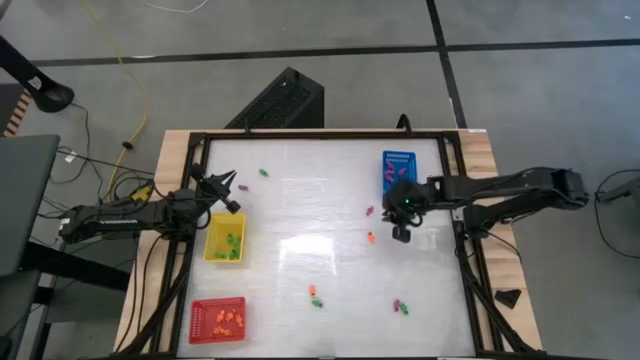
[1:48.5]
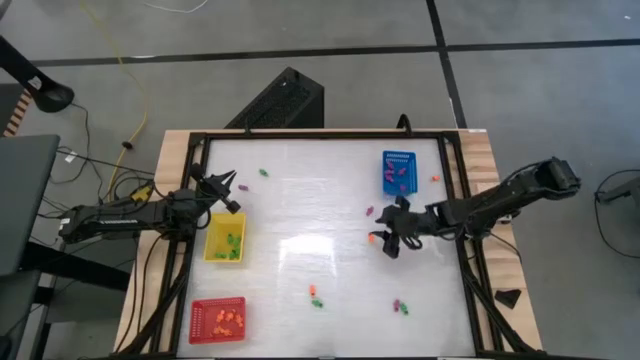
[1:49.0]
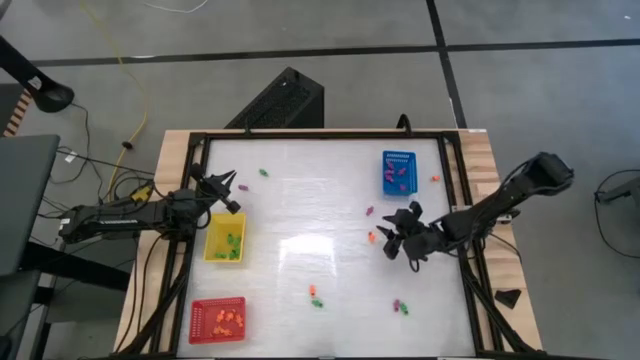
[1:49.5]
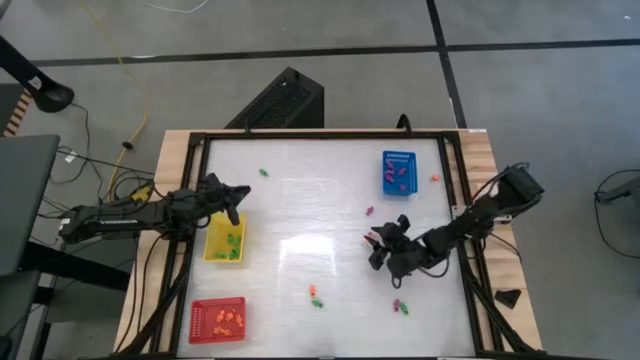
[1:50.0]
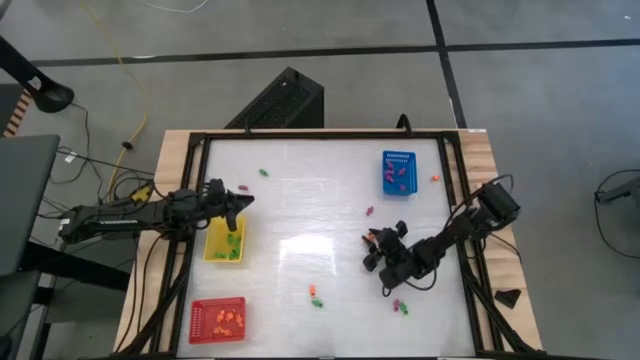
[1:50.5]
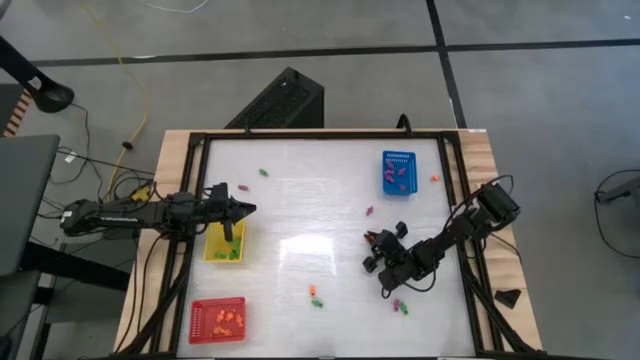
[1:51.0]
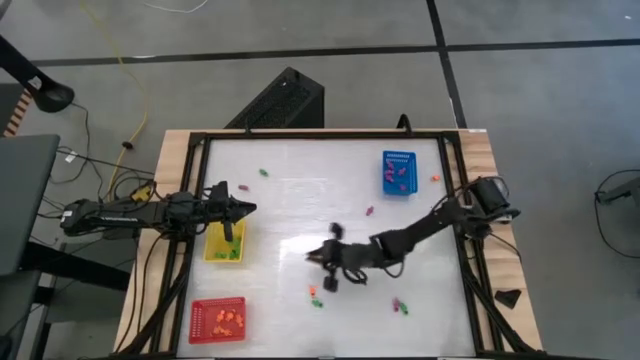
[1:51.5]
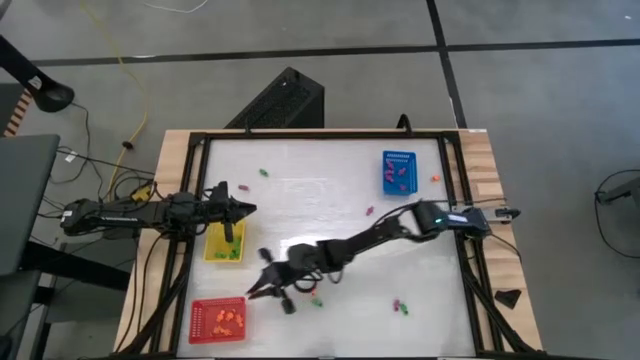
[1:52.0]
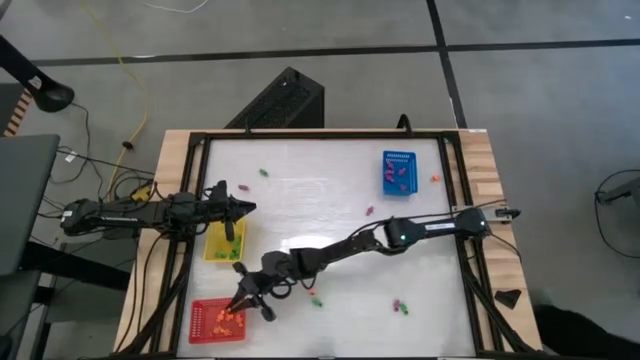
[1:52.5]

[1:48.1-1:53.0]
Task: Sort Halloween decoration
Put the orange skeleton toy into the red bin

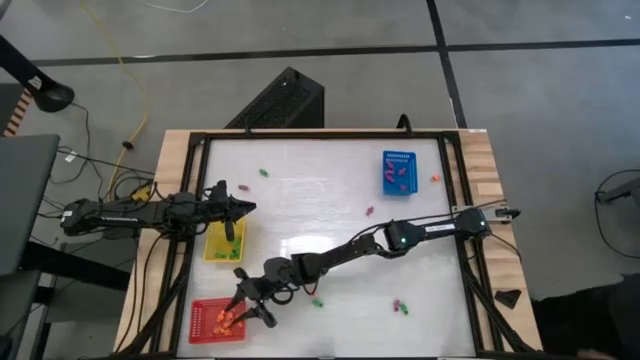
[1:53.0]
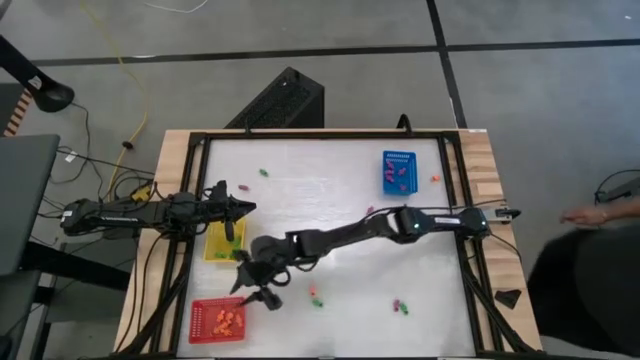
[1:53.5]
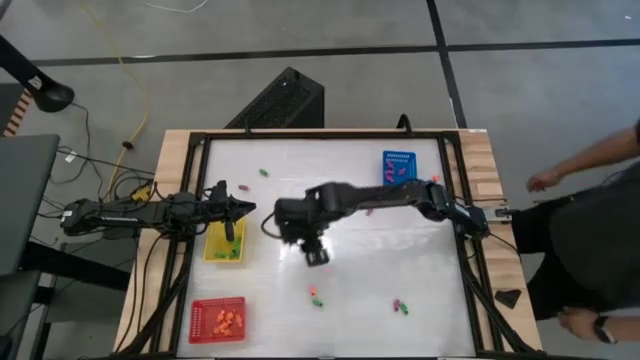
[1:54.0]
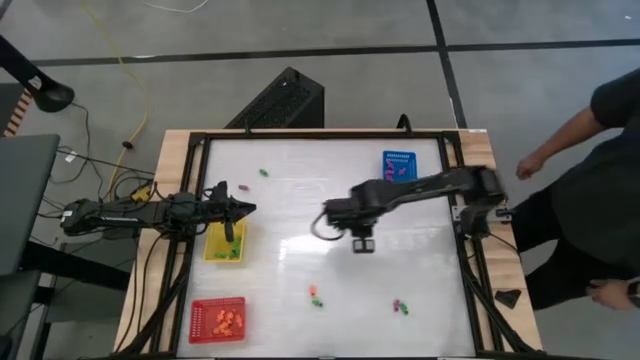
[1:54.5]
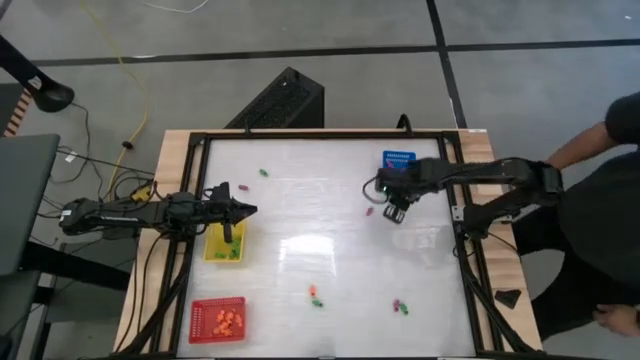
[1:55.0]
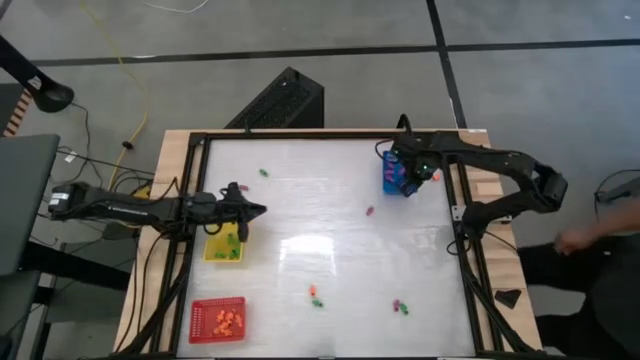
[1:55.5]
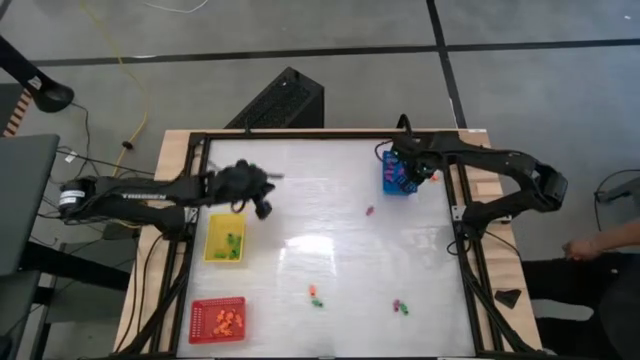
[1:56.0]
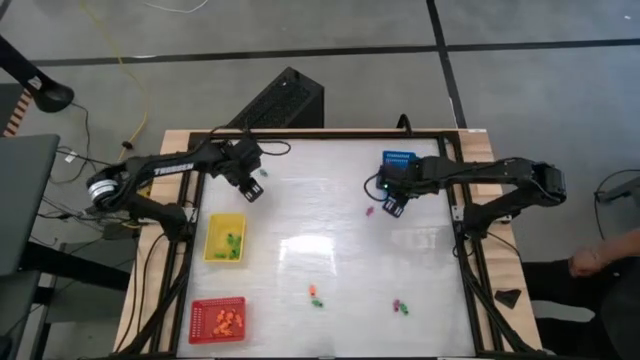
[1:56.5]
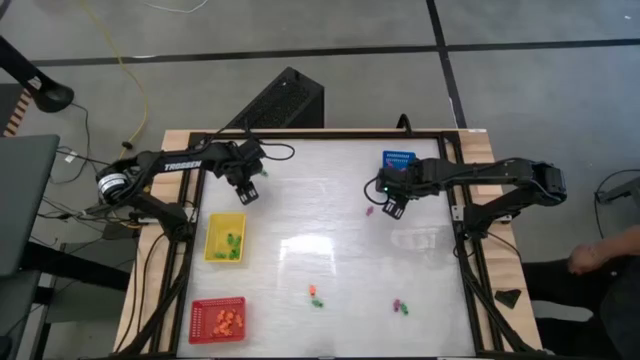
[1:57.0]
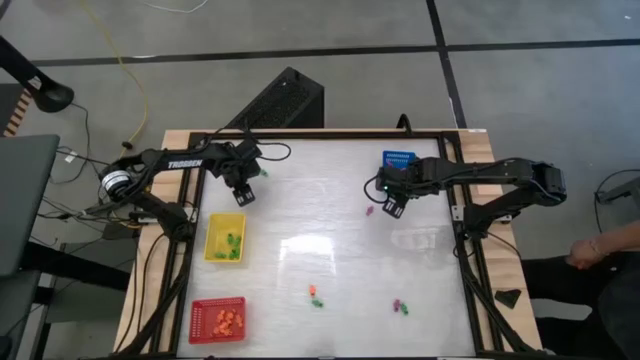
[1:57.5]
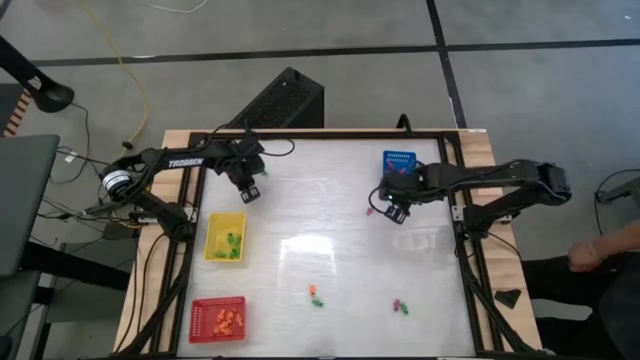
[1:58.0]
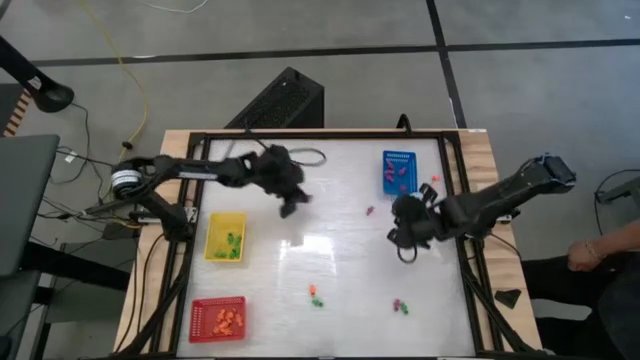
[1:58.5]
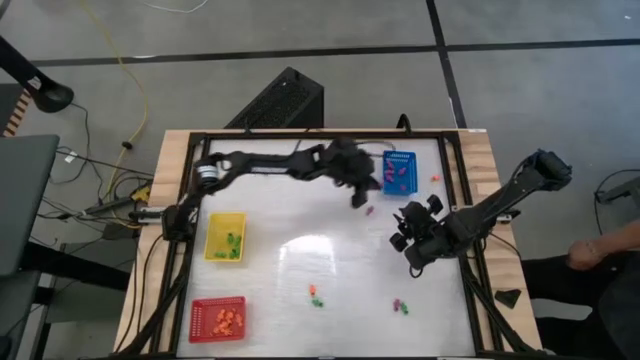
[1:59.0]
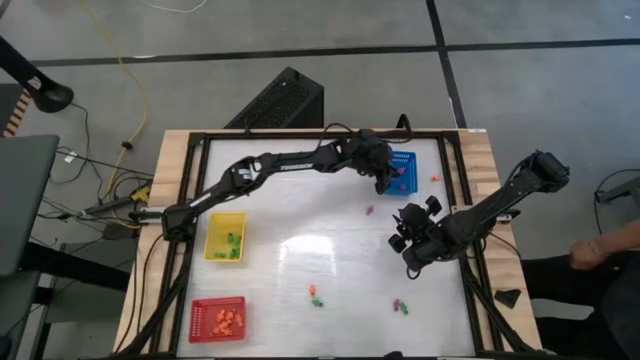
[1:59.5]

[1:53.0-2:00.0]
Put the purple skeleton toy into the blue bin

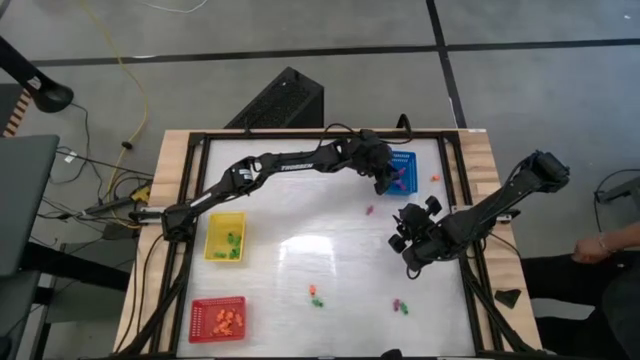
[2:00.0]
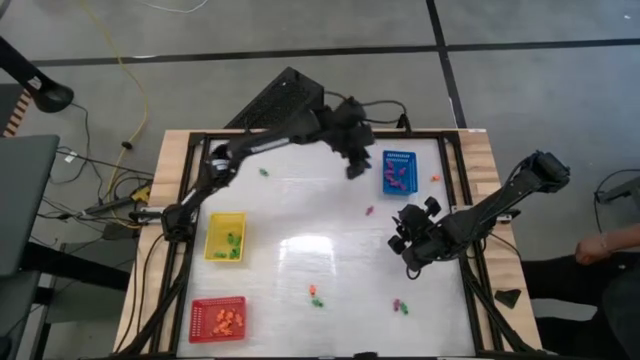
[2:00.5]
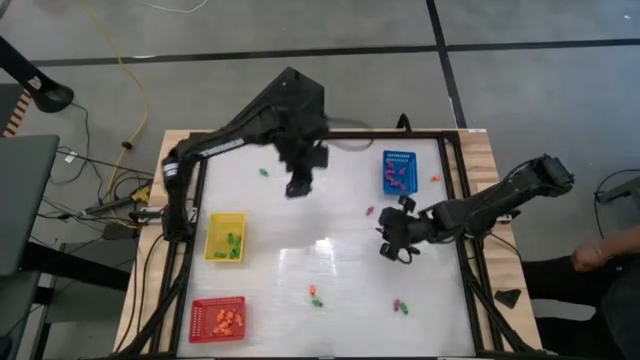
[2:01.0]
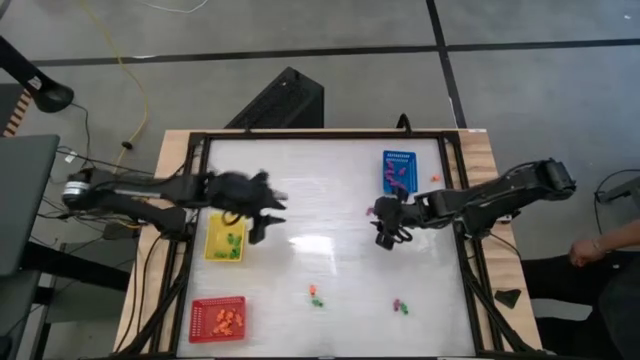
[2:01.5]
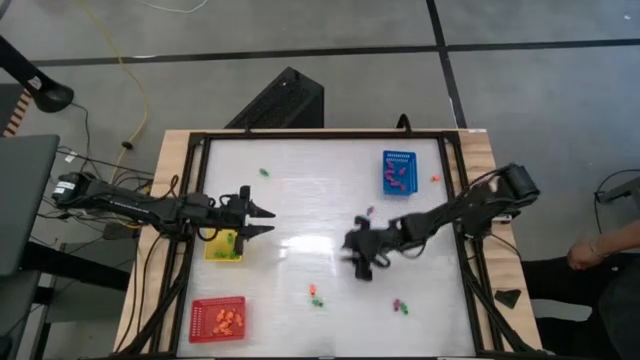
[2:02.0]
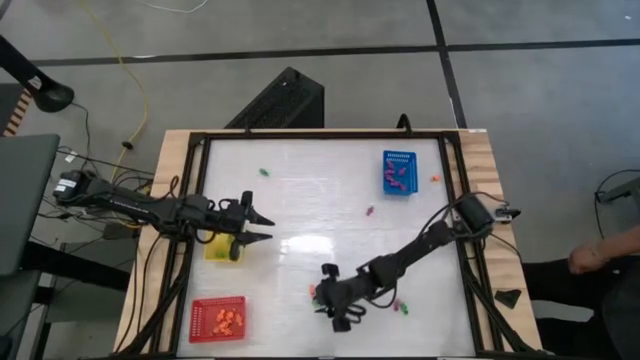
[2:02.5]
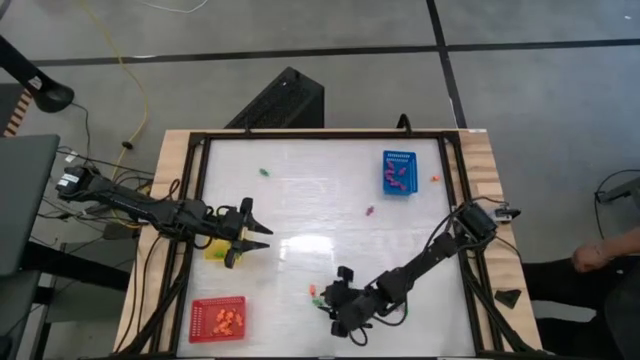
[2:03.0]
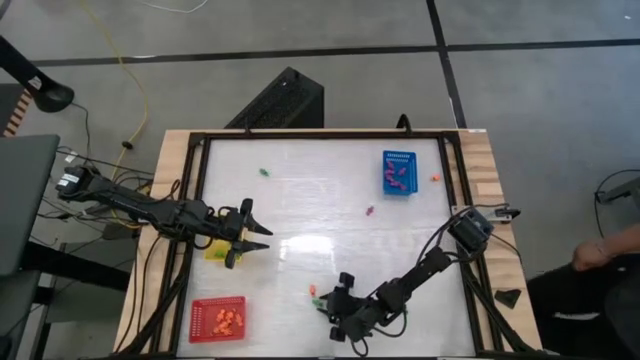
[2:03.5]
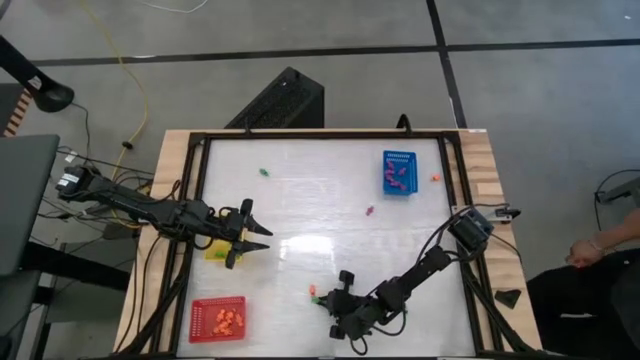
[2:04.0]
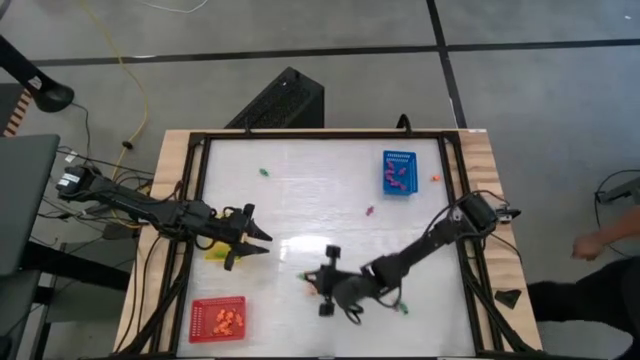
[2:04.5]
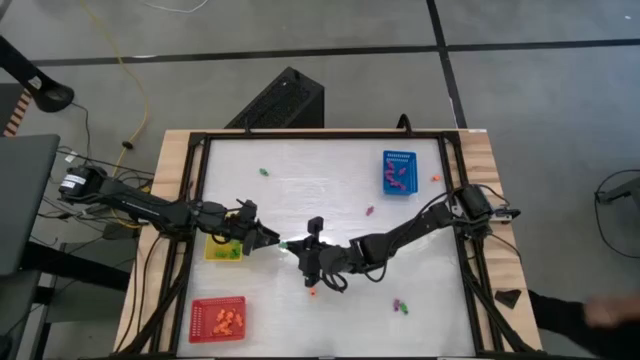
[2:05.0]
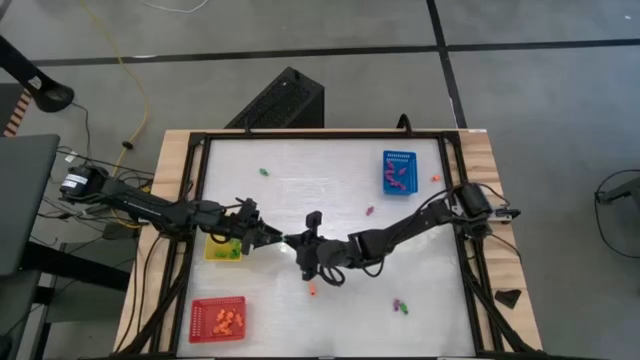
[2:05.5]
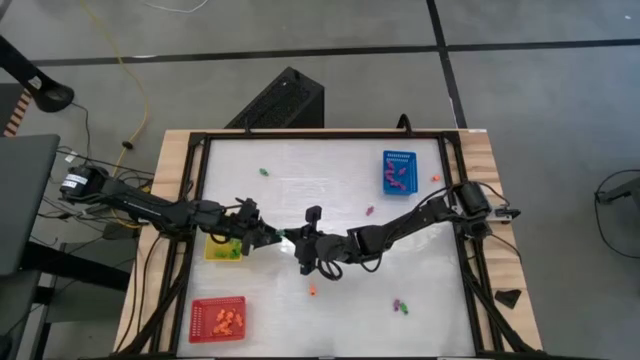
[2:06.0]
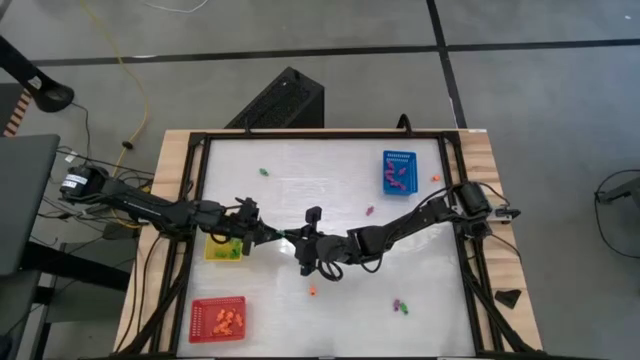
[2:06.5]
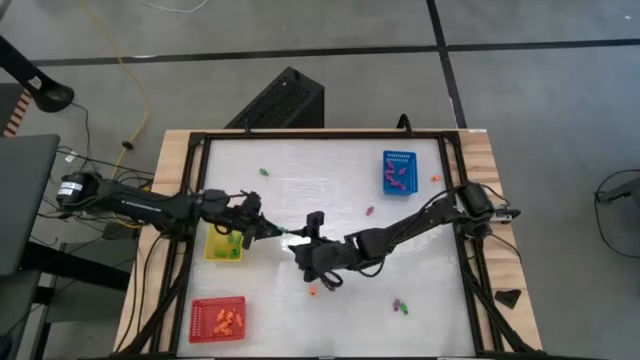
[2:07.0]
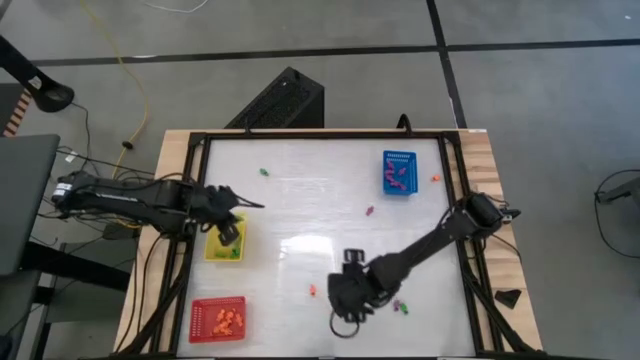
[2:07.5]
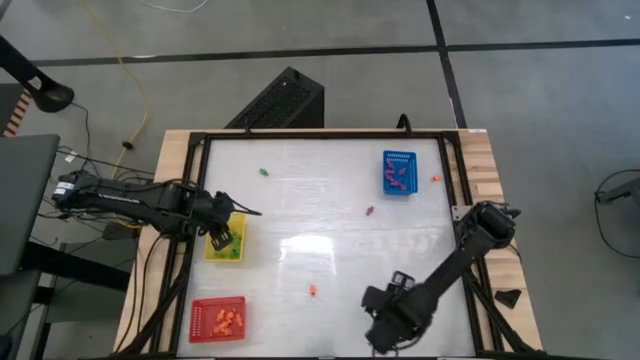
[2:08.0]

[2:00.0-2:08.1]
Put the green skeleton toy into the yellow bin
